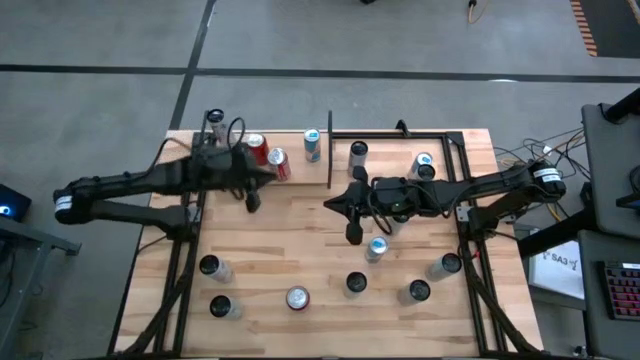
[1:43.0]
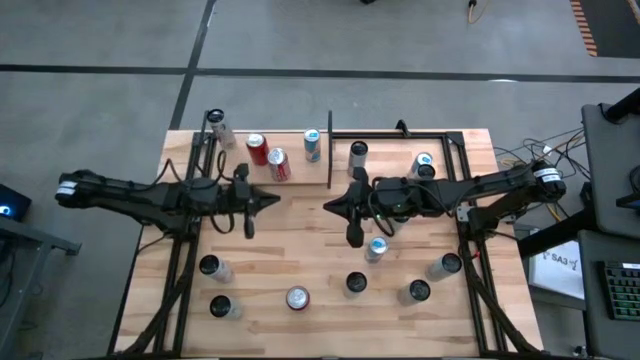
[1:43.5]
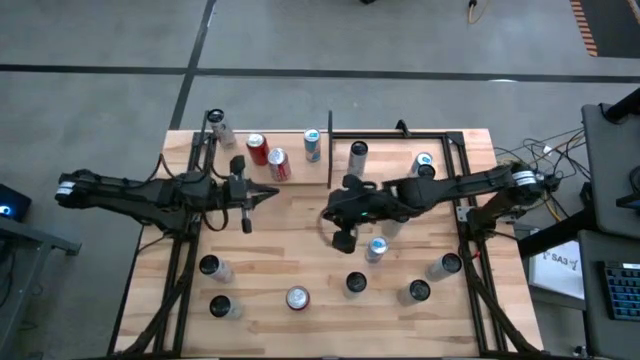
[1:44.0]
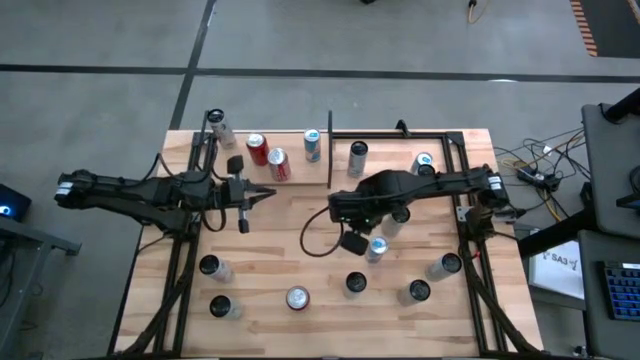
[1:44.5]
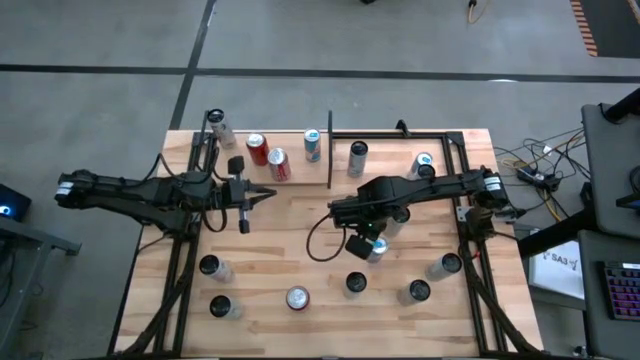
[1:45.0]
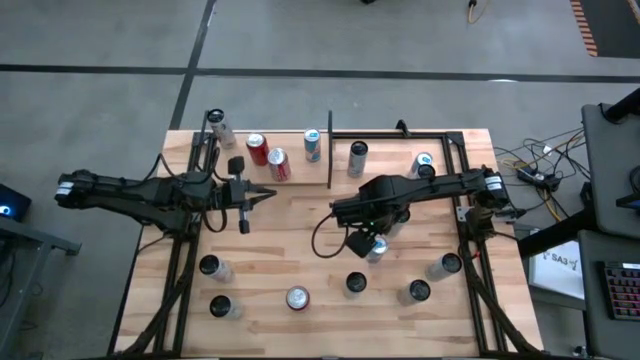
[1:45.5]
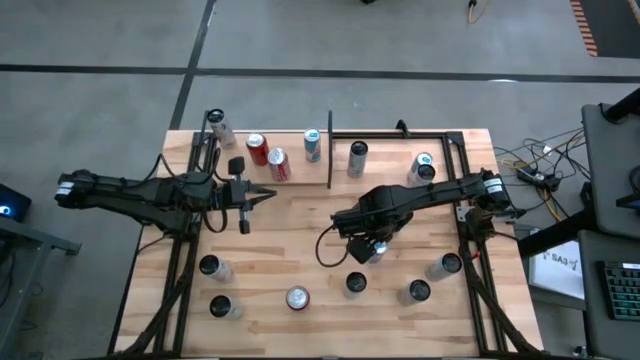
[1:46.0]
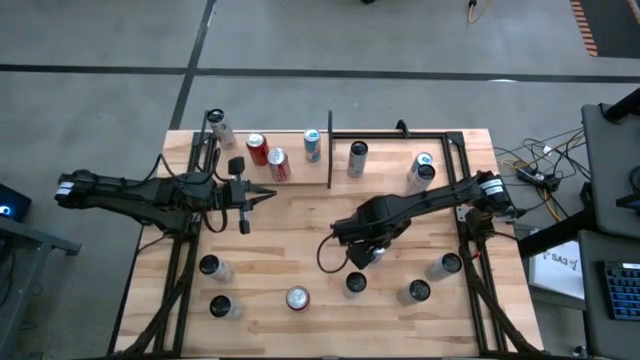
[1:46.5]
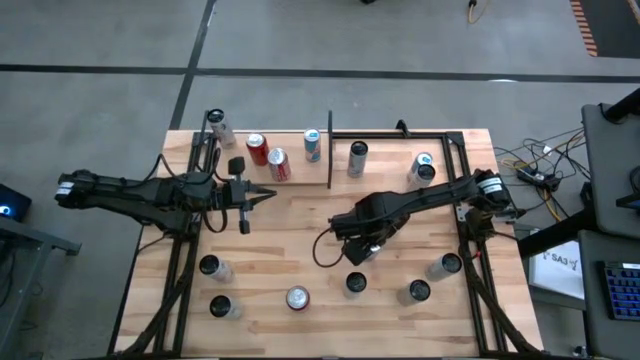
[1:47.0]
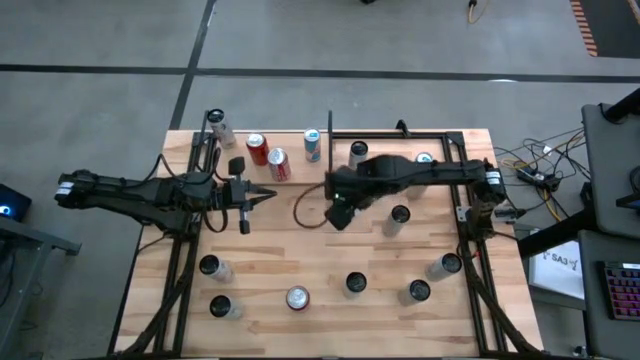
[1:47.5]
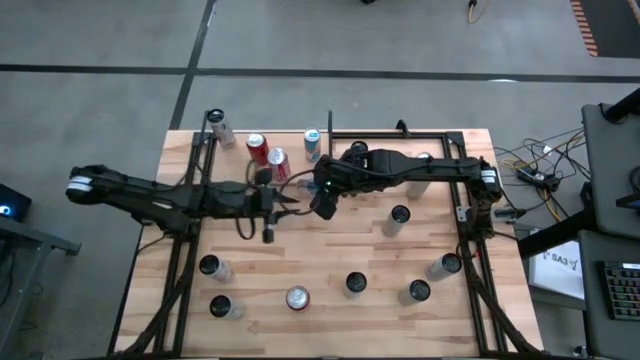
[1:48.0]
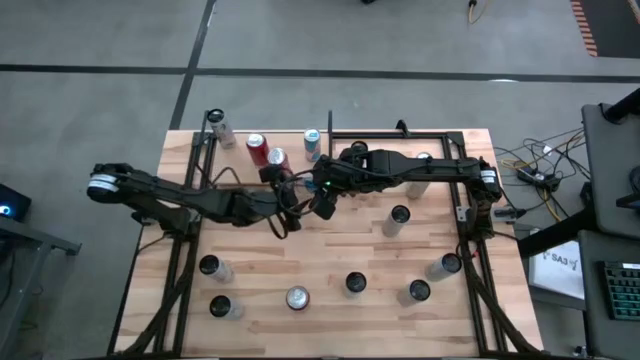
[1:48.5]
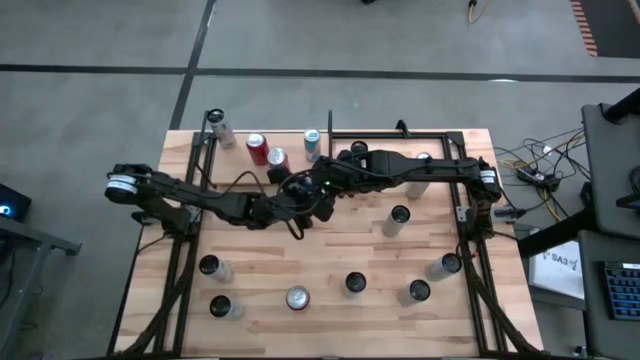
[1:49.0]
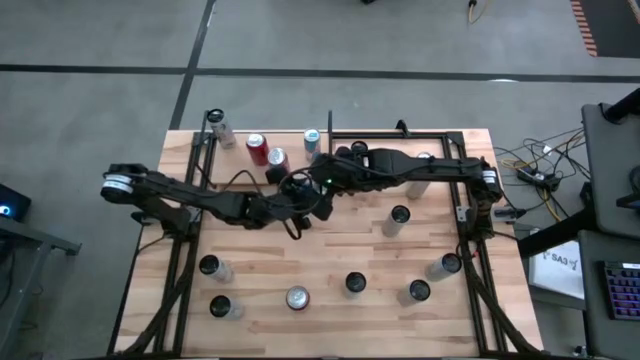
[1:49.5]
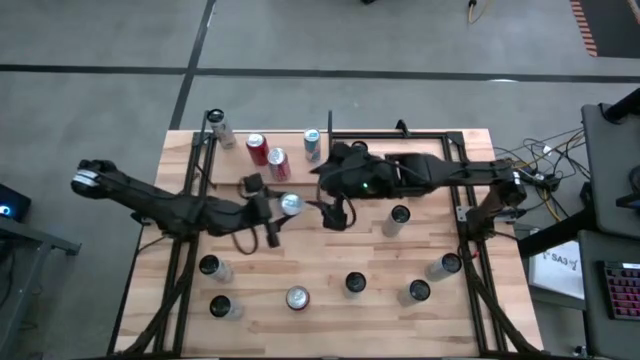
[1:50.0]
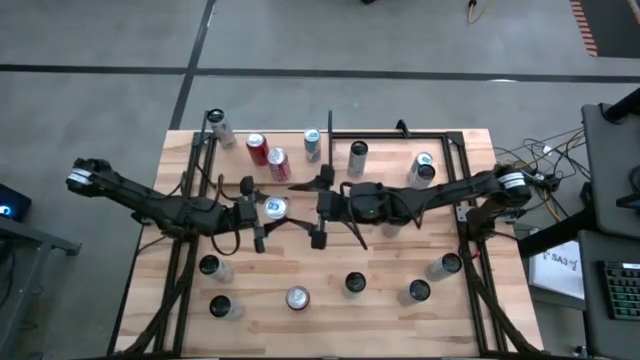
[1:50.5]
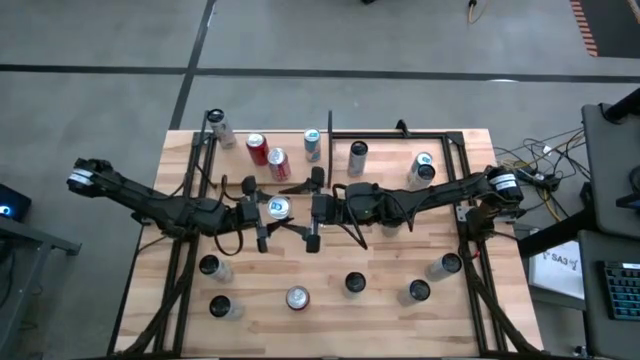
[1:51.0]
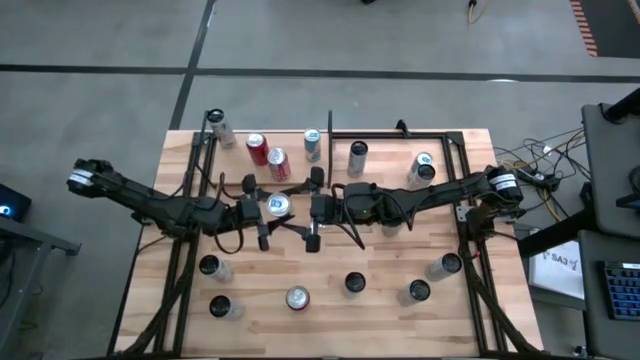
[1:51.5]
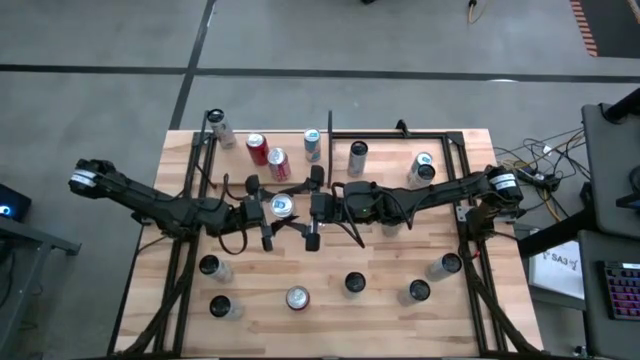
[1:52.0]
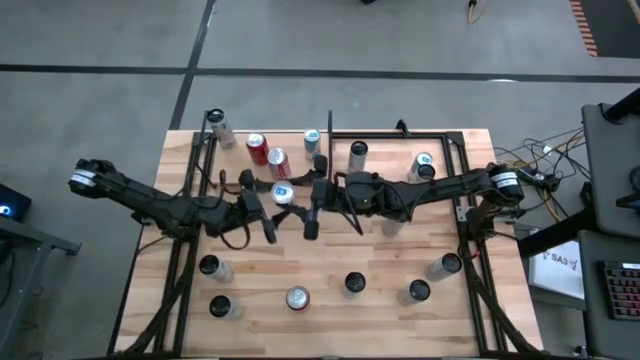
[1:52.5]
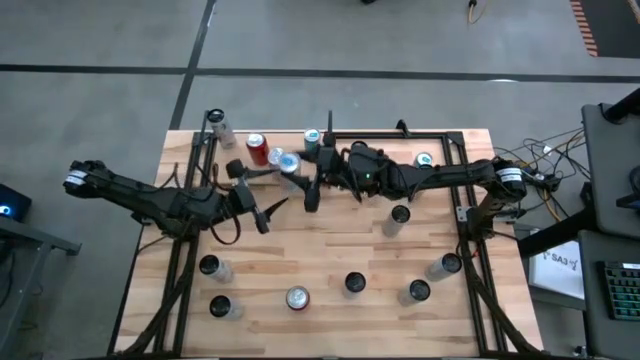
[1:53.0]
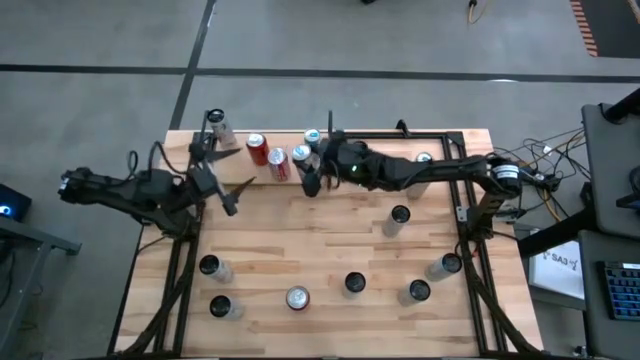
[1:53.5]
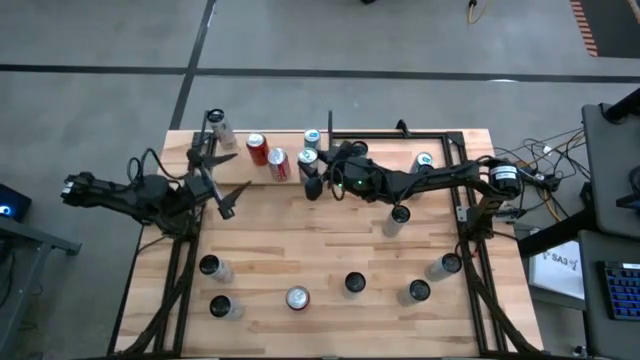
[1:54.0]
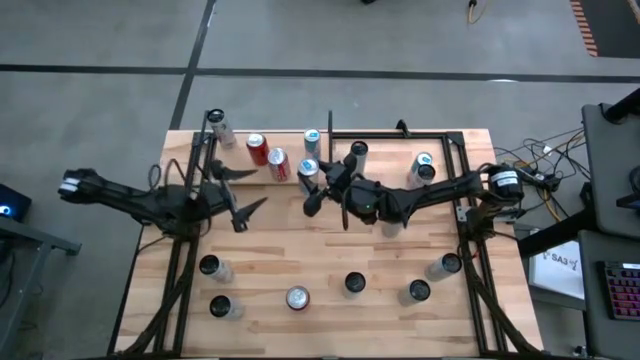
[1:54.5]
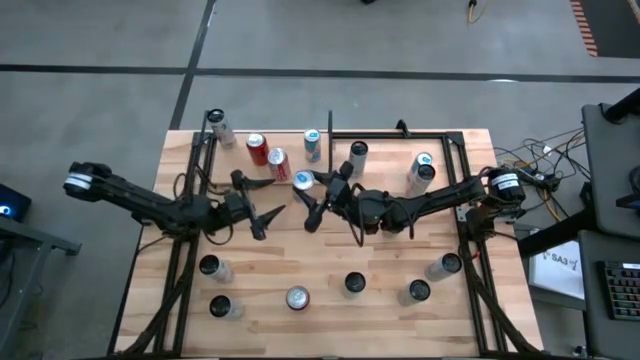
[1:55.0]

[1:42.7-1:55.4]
Task: Place canned beverage on shelf
Put the bottom blue and silver soda can on the shelf aligned with the other blue and silver soda can

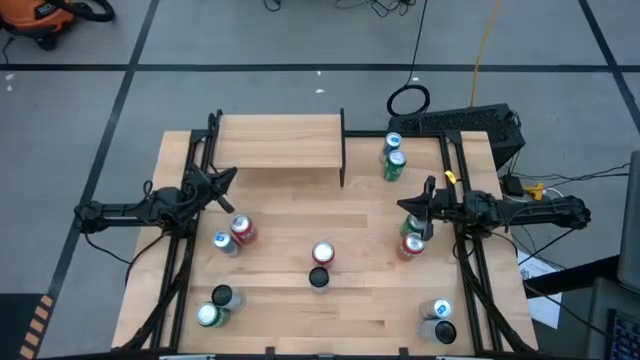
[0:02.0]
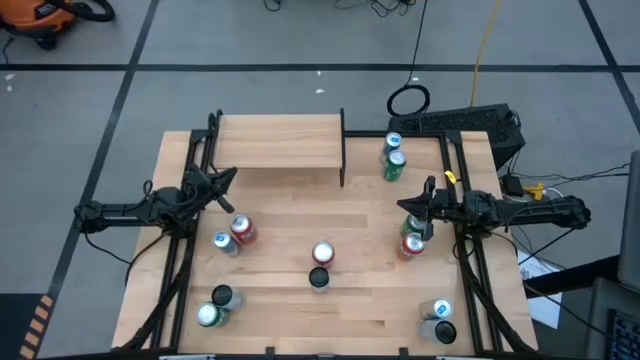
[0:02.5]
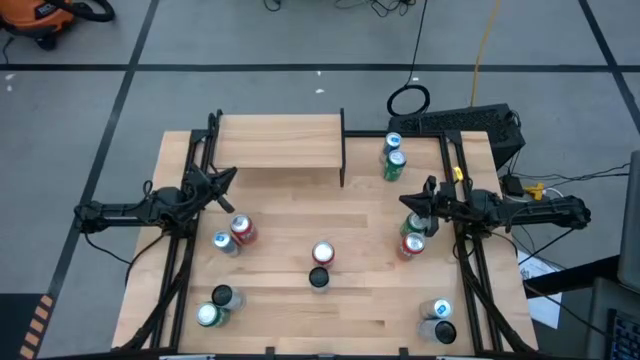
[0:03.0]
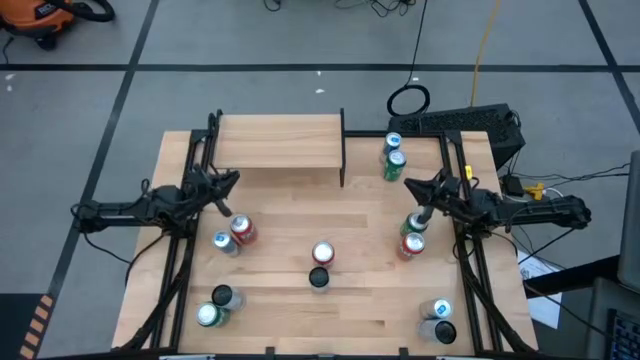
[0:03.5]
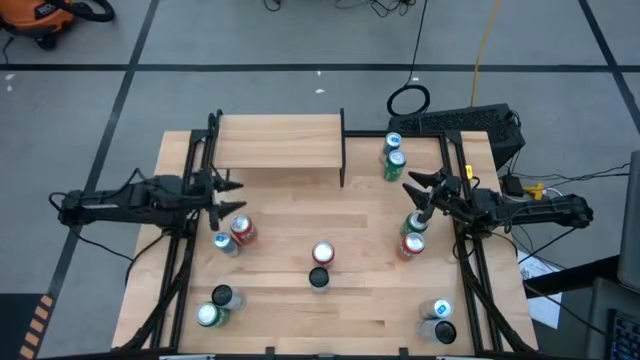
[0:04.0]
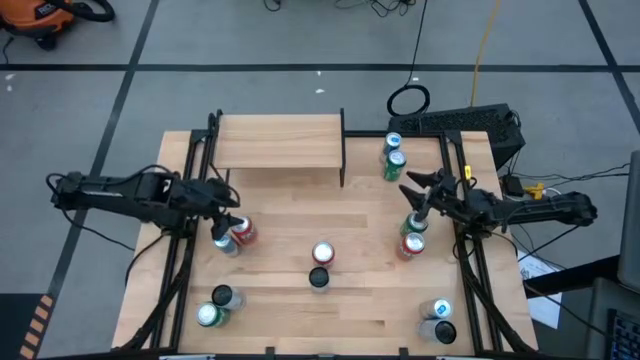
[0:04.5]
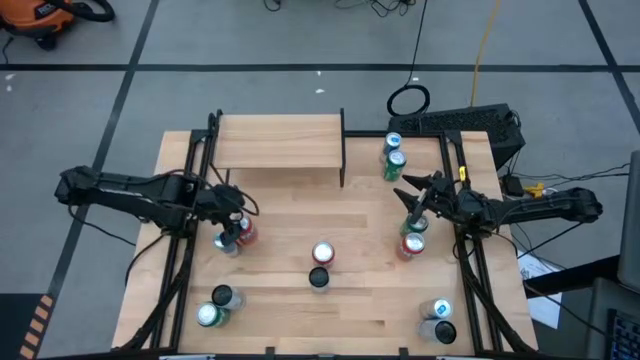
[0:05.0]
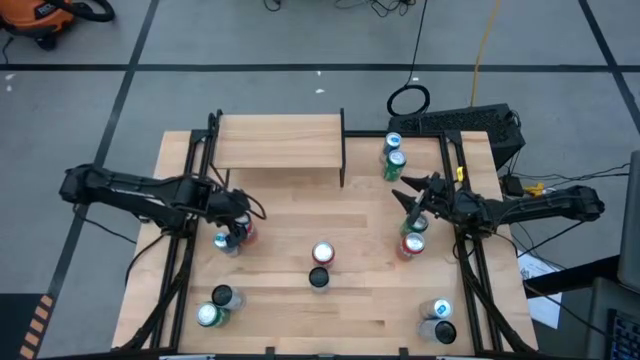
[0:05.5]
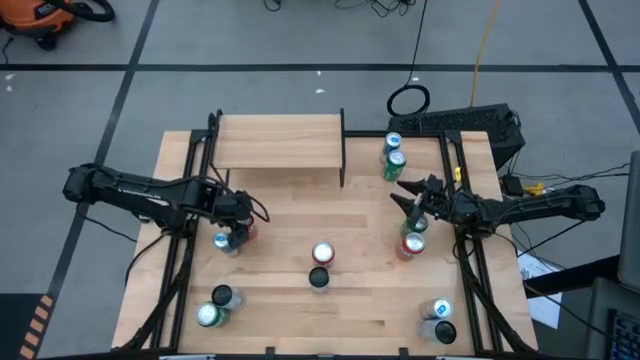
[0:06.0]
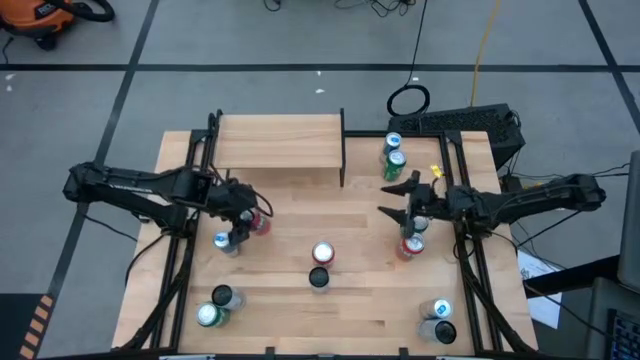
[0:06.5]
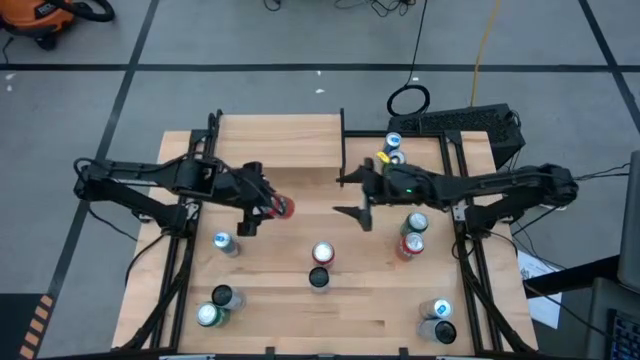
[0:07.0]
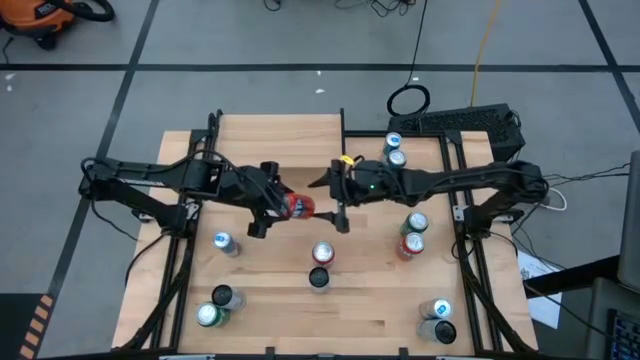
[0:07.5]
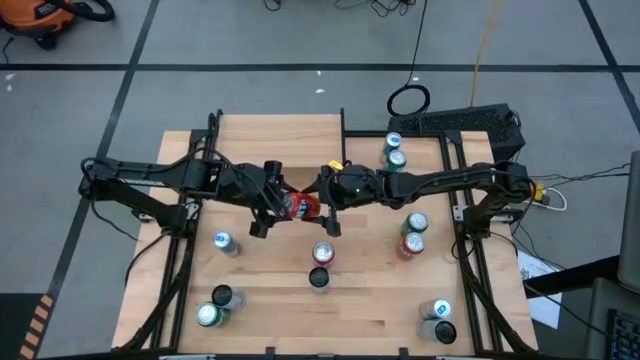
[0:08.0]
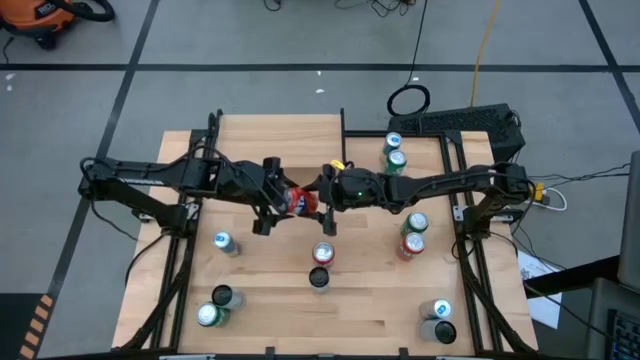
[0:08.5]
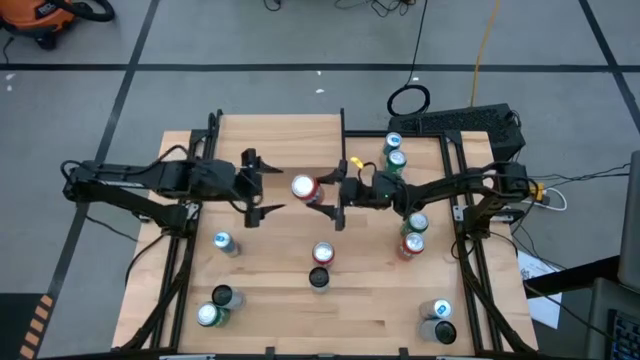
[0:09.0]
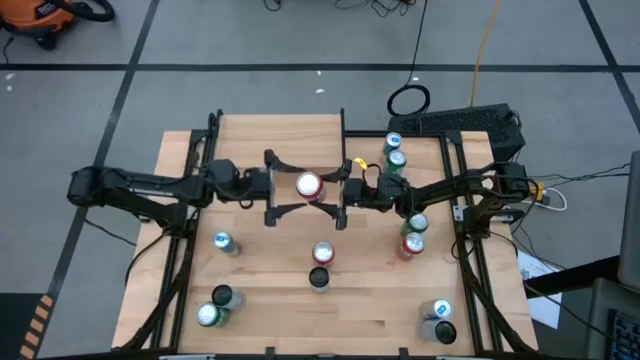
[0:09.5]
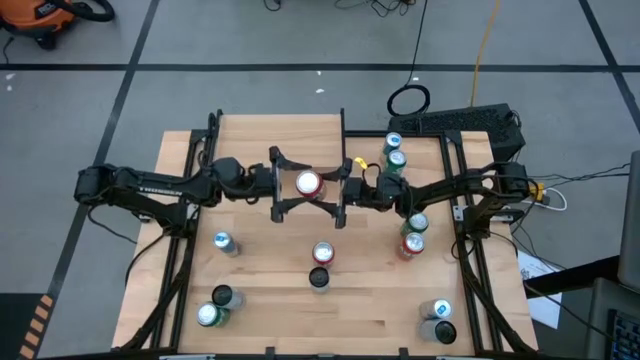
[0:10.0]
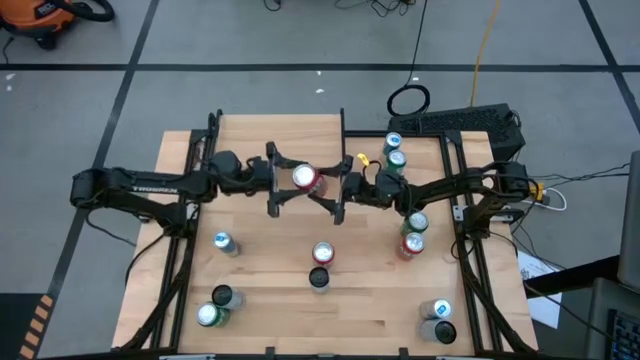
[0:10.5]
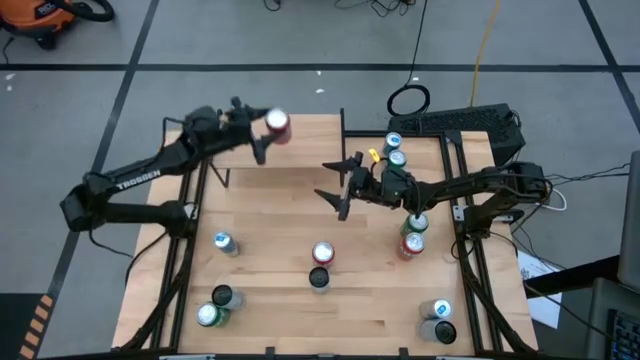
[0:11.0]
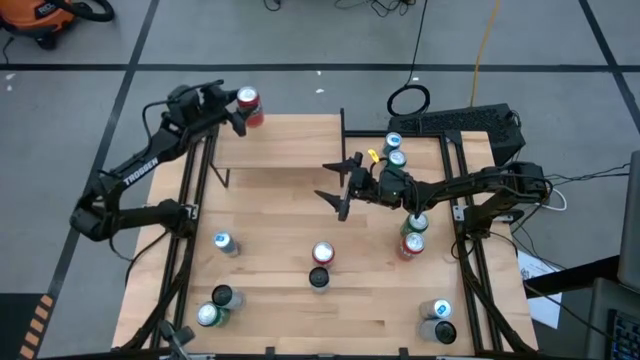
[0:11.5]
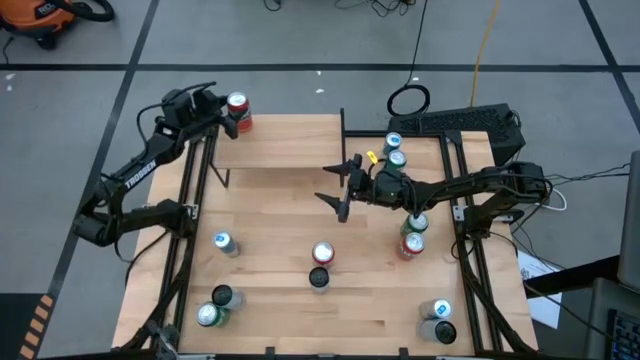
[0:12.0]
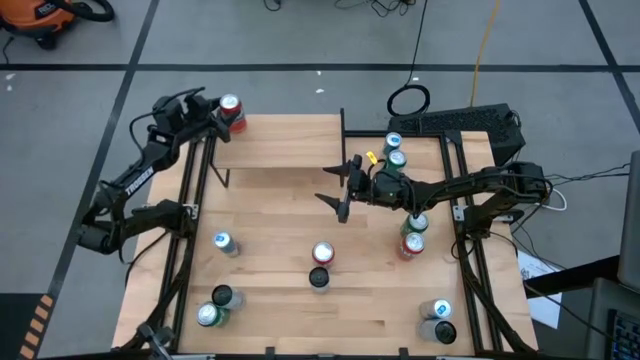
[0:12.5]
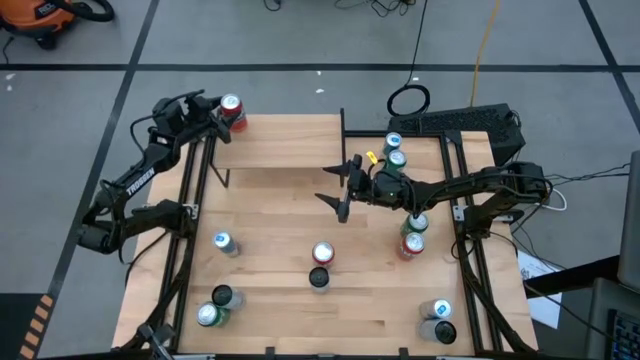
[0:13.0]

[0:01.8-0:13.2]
Task: Place canned beverage on shelf
Put the left orange soda can on the shelf
